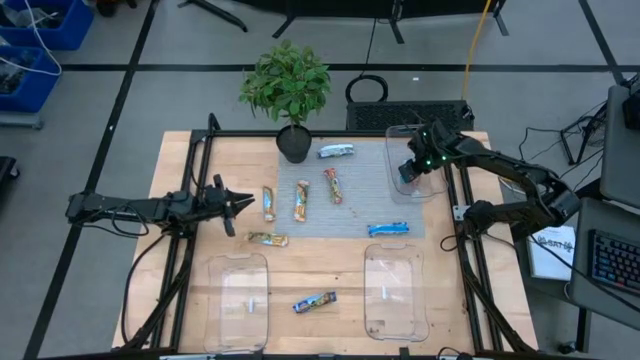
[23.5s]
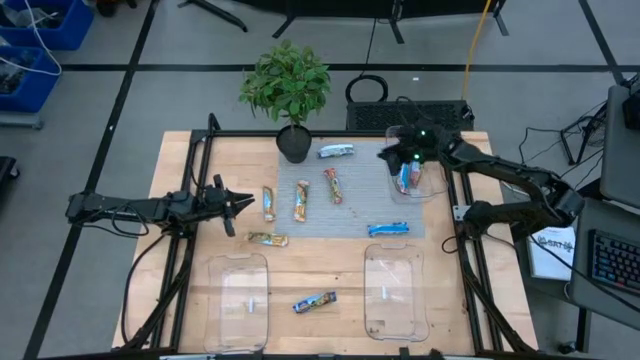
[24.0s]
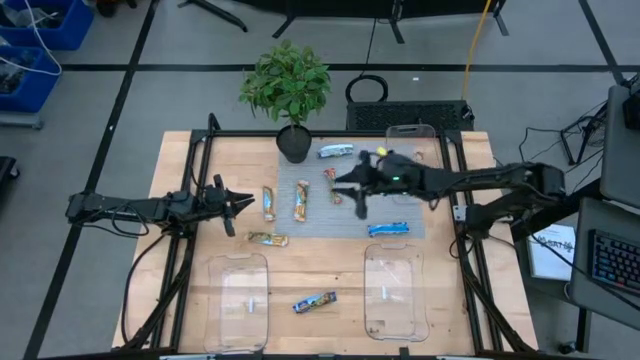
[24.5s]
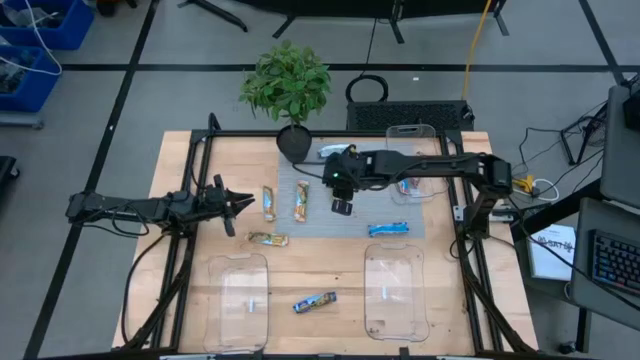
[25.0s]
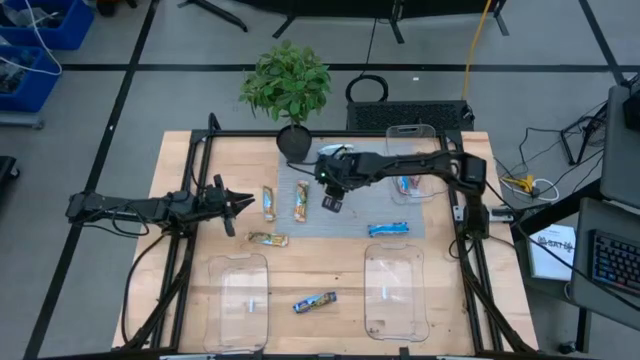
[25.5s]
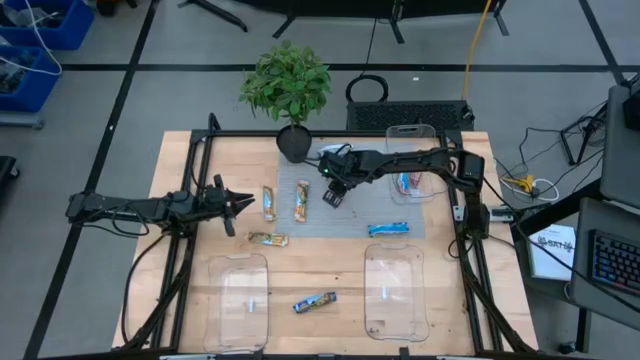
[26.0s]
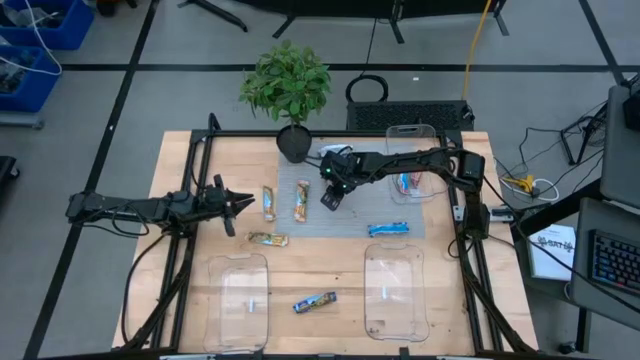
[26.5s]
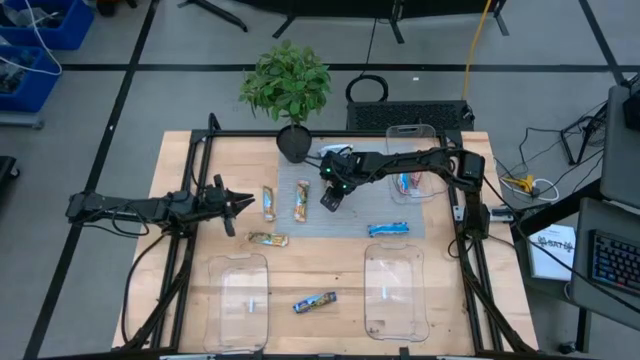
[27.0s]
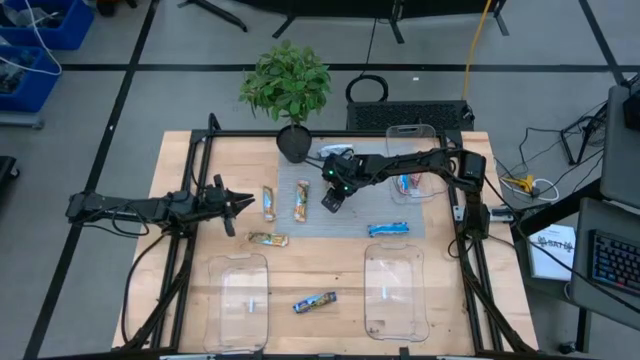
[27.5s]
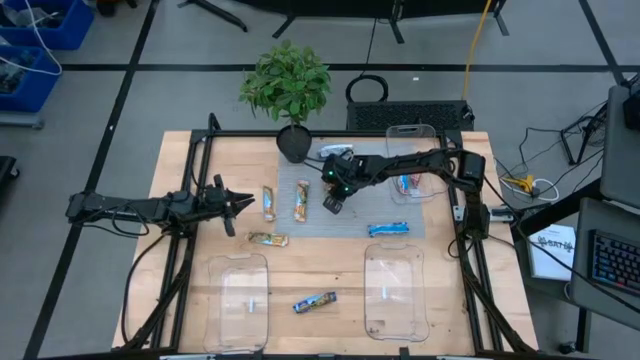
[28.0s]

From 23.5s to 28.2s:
Task: Pick and place Granola Bars by type
Put the red granola bar into the top transparent bin

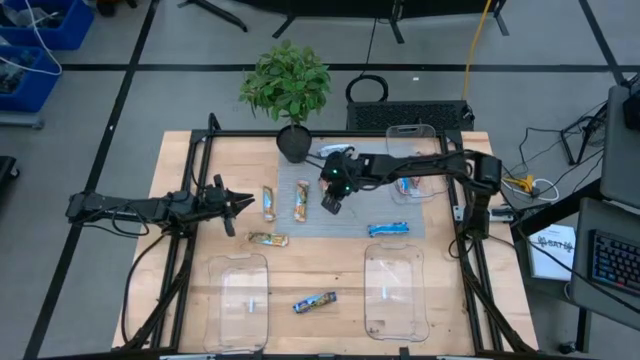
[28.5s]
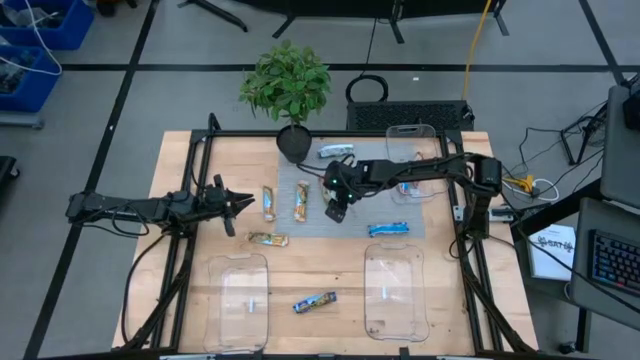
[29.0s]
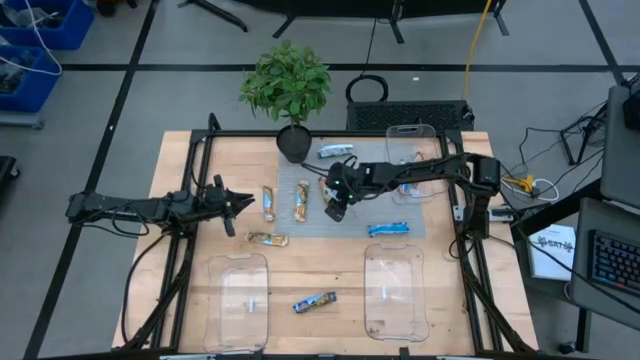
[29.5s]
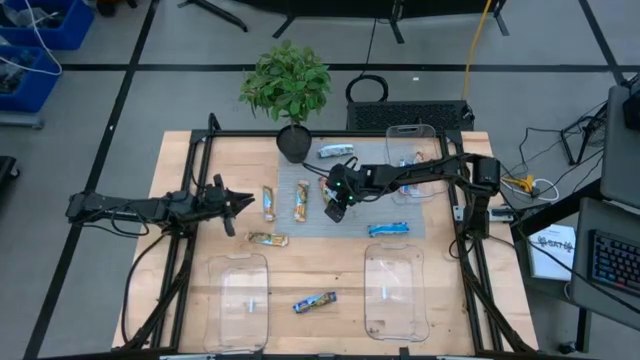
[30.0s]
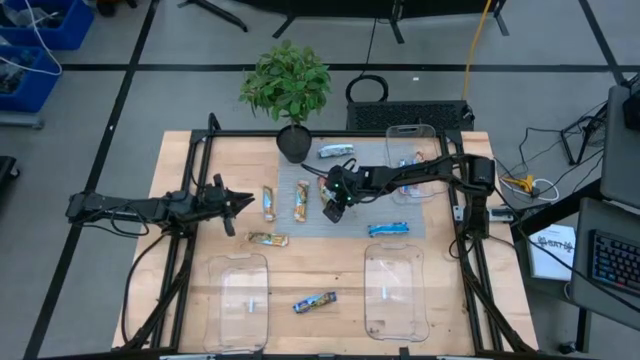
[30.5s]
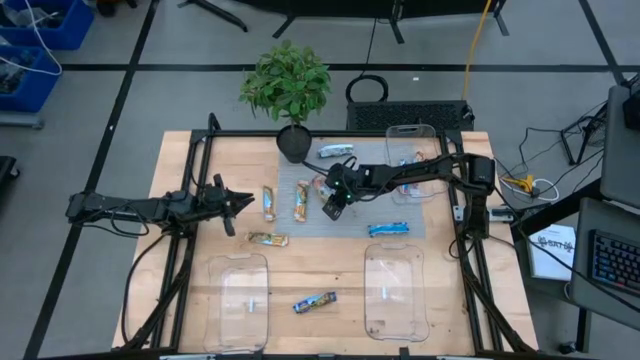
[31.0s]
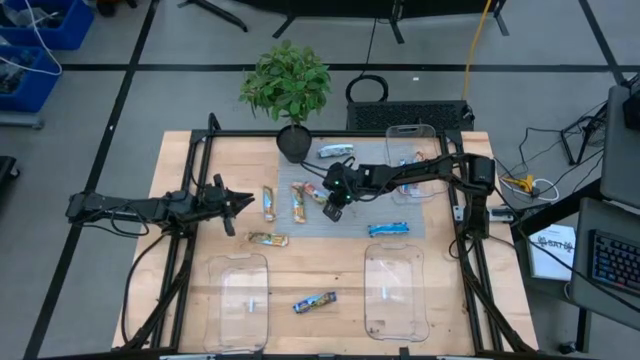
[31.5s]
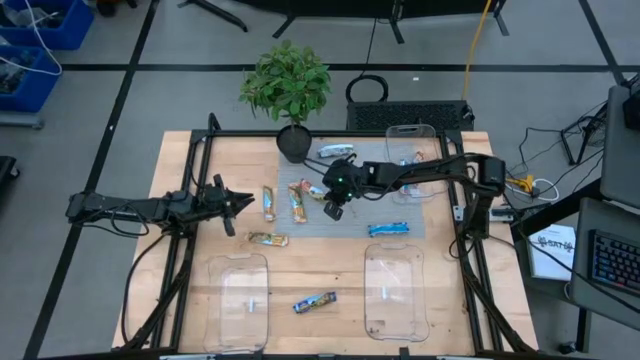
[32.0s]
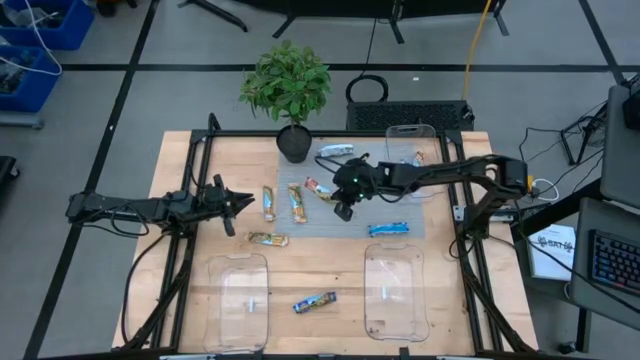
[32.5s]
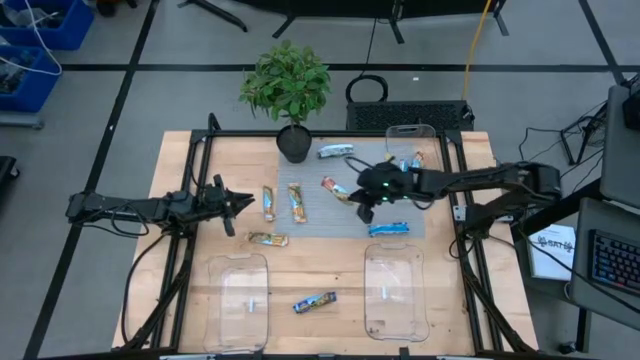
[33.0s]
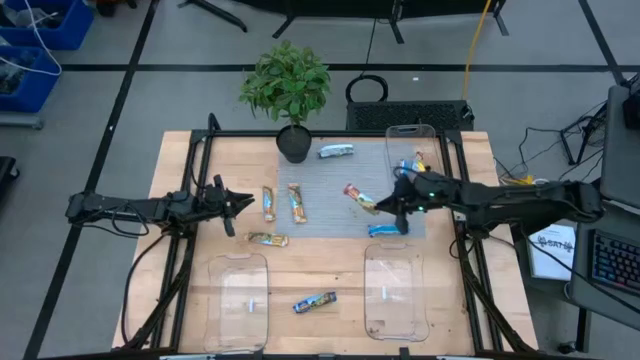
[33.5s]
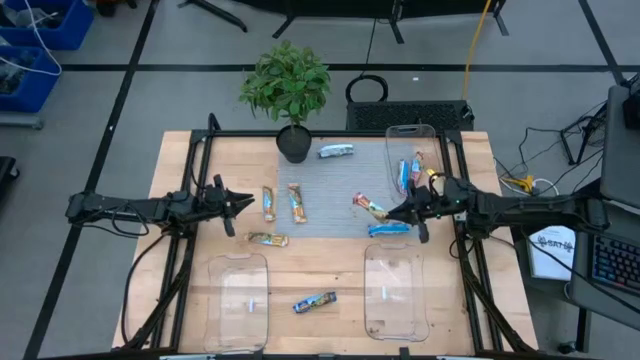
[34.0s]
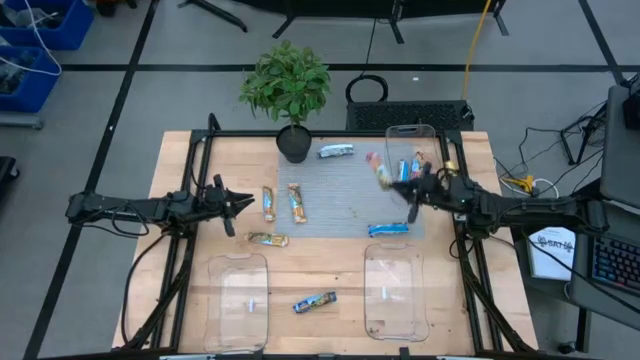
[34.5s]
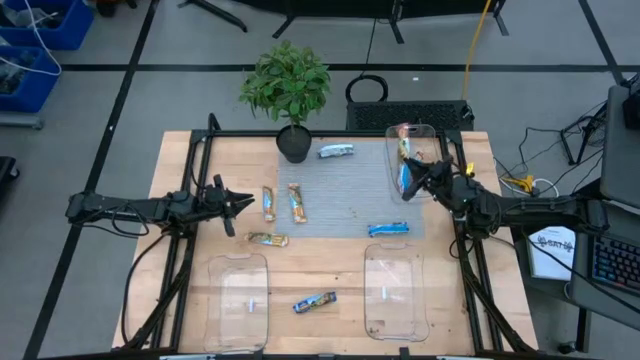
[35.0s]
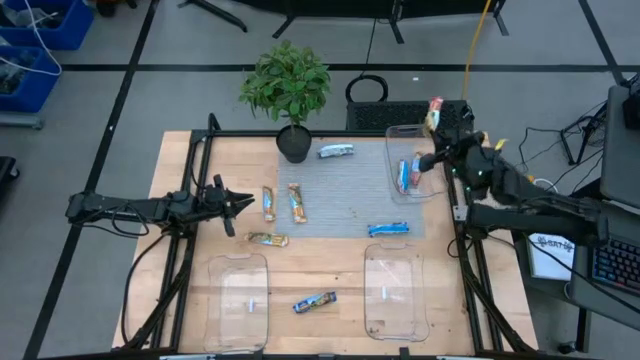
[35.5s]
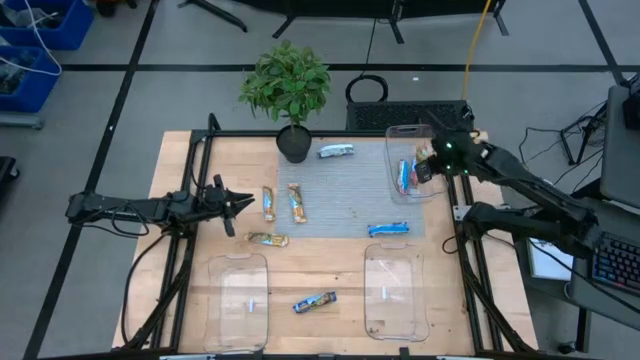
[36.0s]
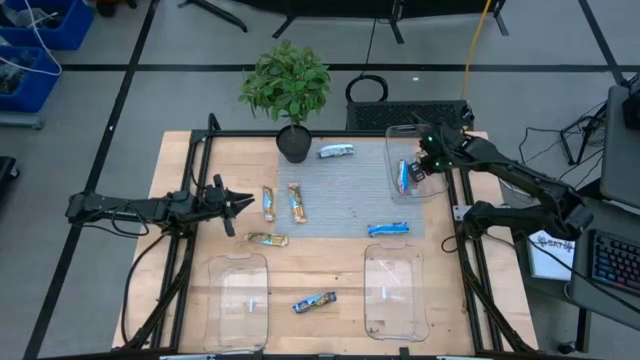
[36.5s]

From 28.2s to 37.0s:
Put the red granola bar into the top transparent bin

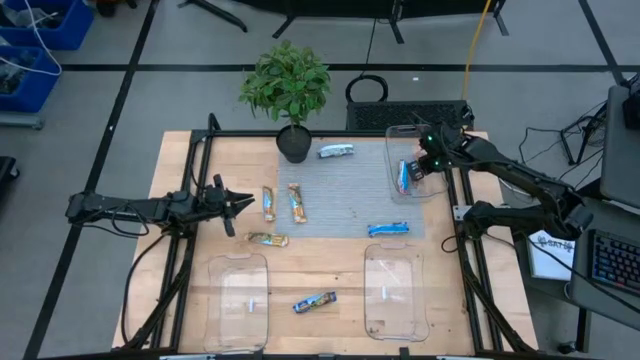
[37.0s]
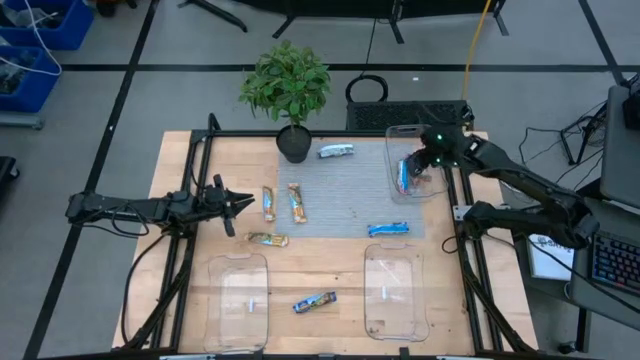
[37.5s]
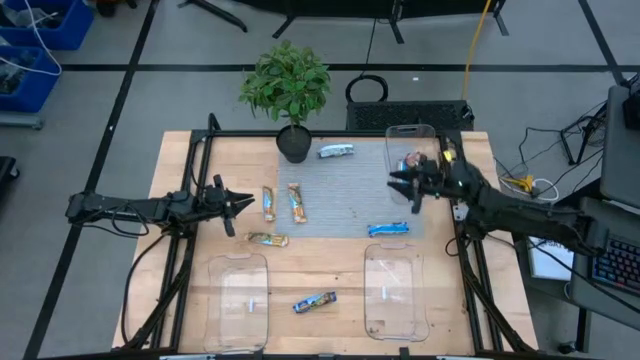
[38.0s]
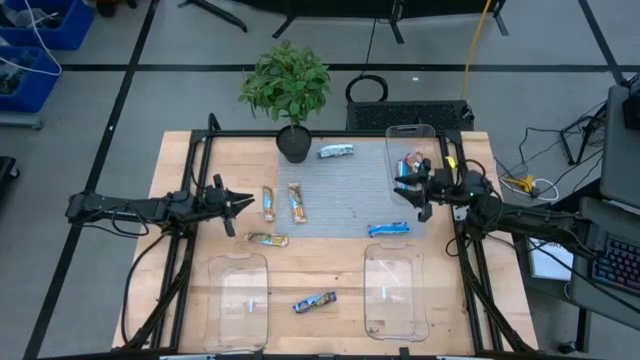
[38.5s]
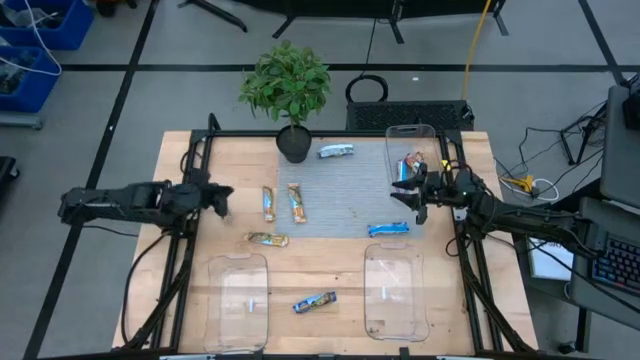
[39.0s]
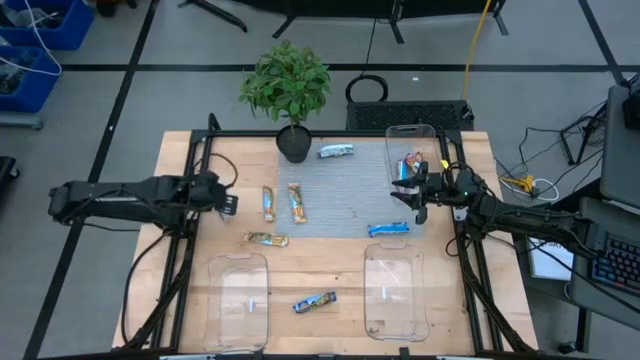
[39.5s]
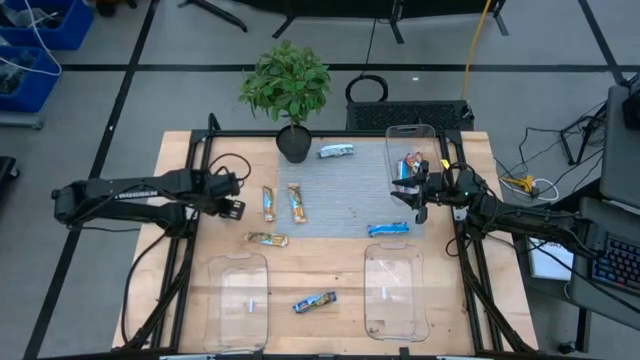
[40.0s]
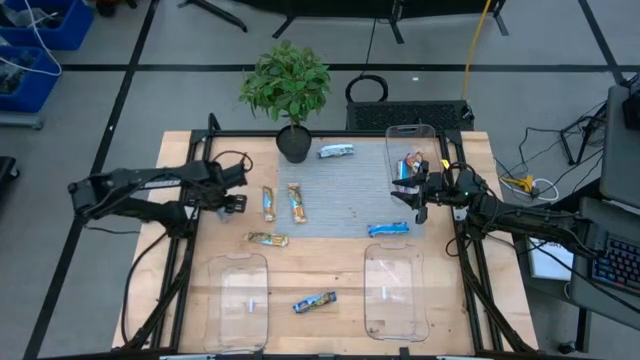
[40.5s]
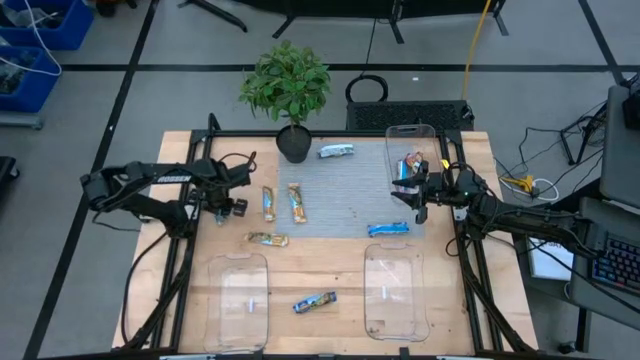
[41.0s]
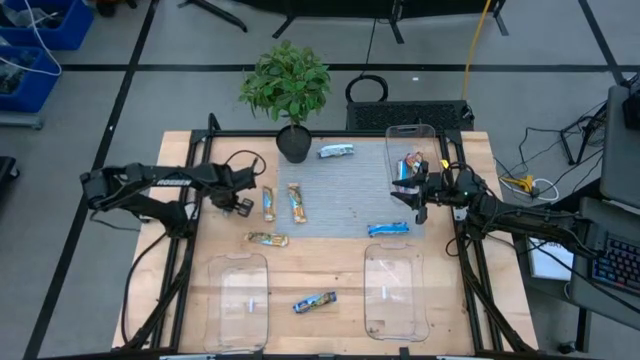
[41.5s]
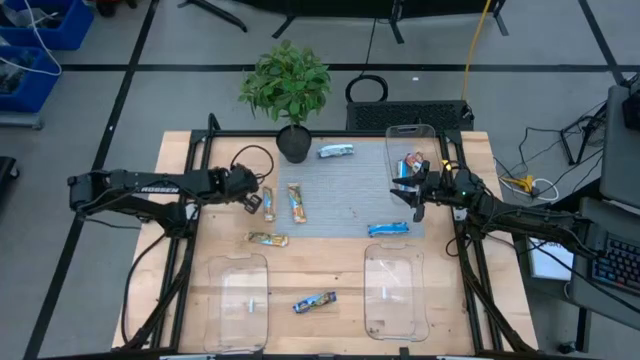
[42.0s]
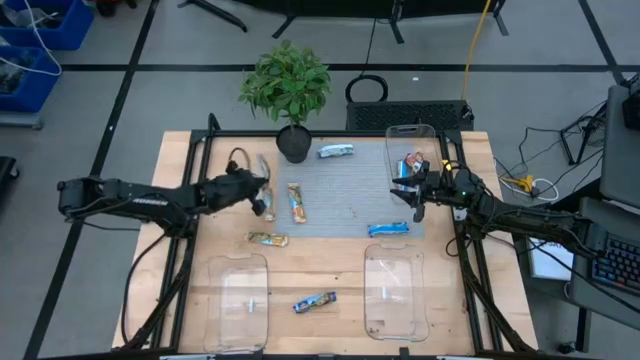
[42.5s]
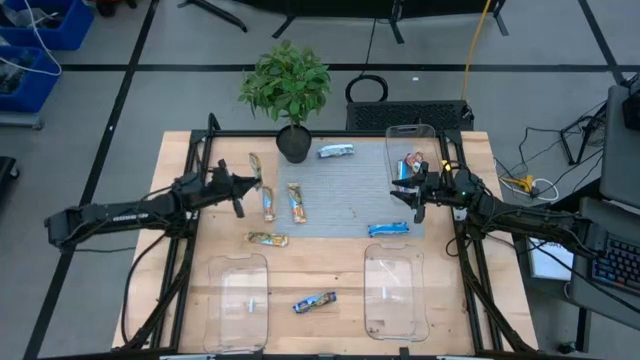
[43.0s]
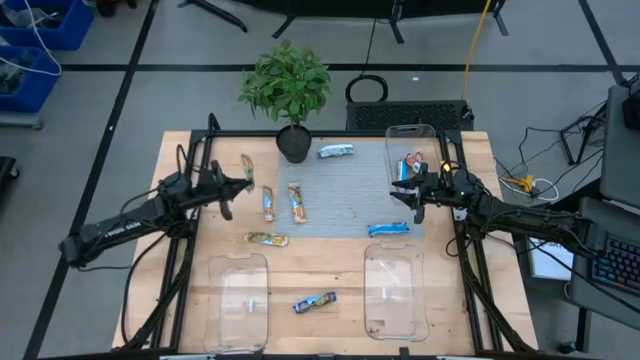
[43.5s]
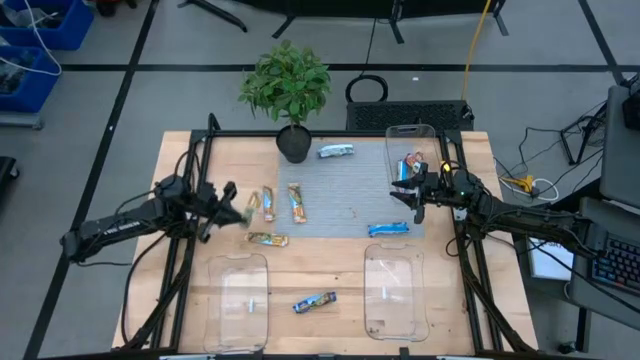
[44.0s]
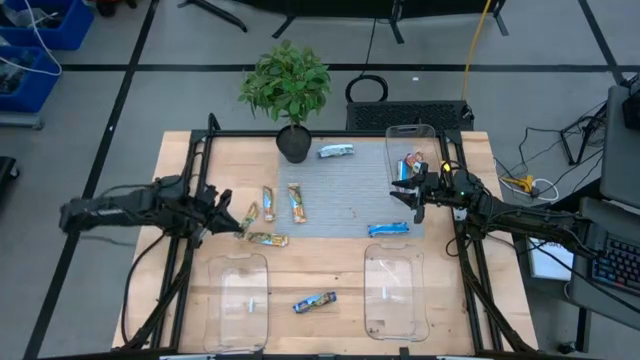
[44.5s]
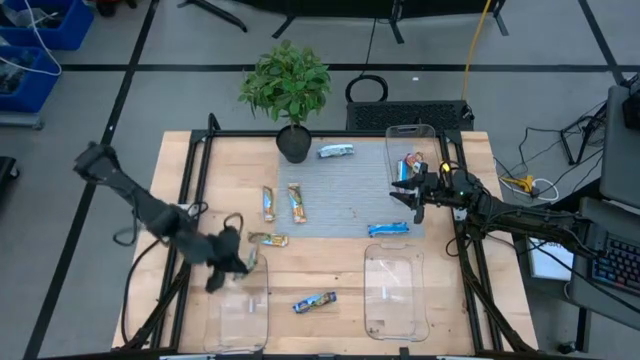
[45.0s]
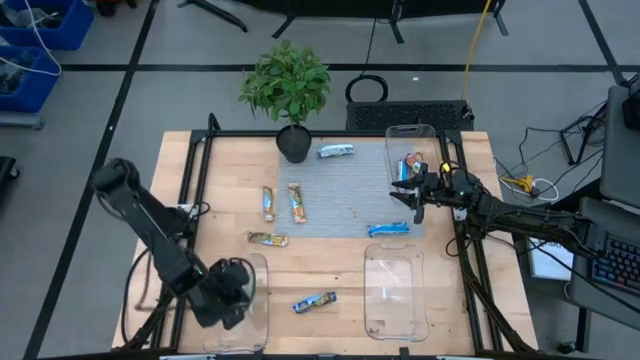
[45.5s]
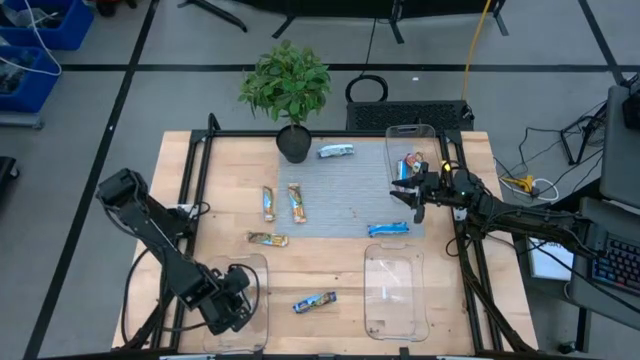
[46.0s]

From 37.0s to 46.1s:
Put the yellow granola bar into the bottom left transparent bin
